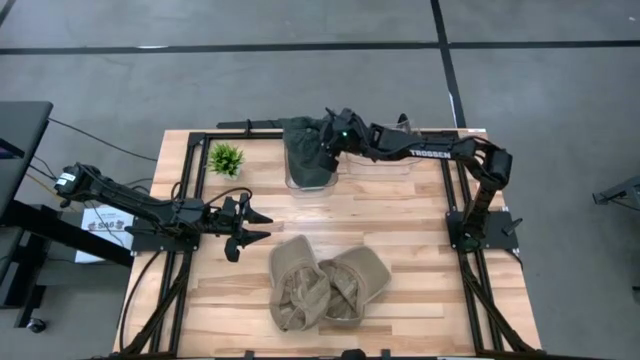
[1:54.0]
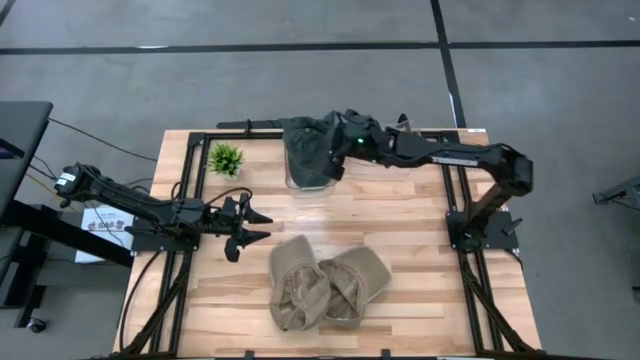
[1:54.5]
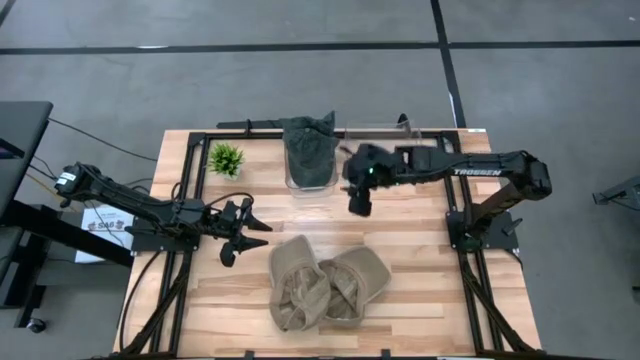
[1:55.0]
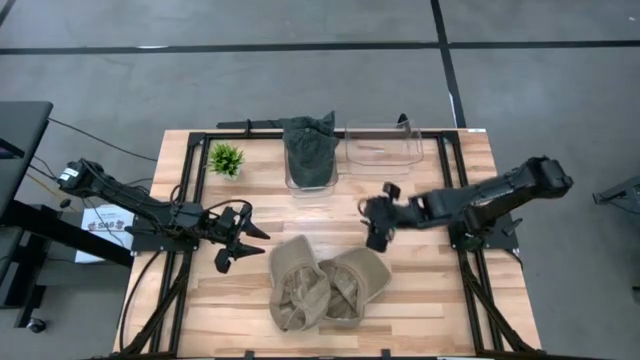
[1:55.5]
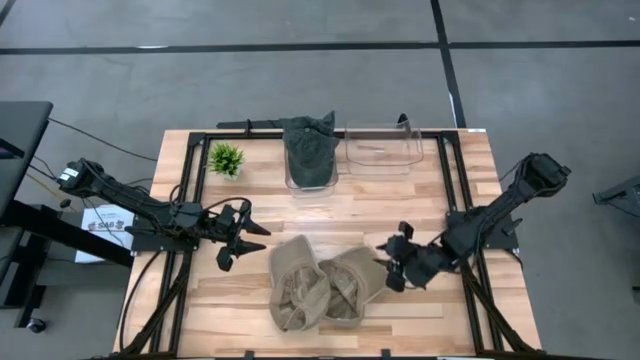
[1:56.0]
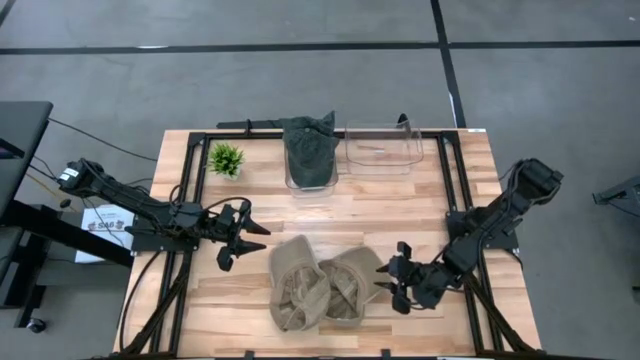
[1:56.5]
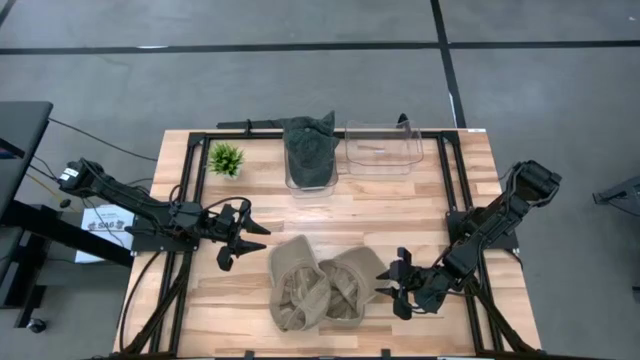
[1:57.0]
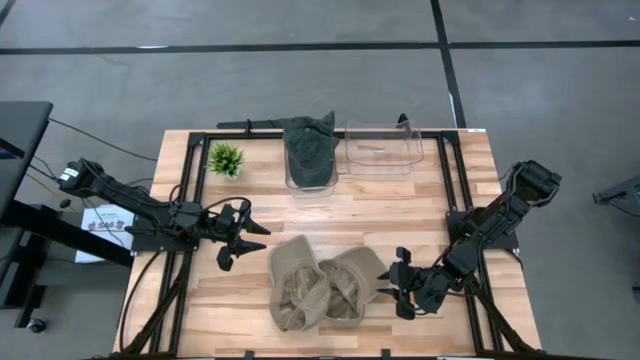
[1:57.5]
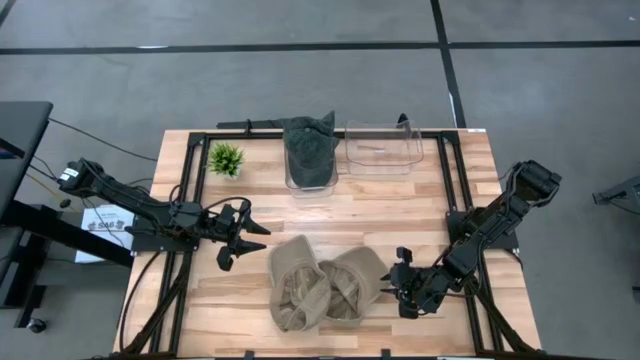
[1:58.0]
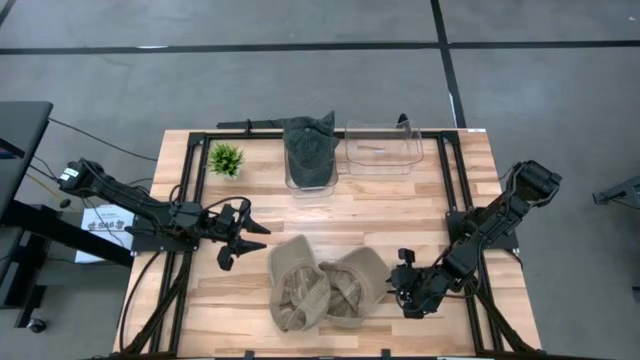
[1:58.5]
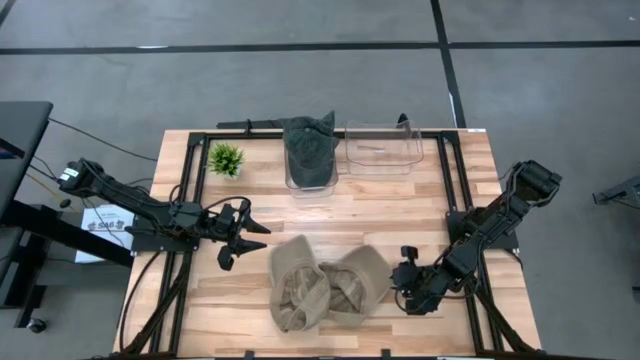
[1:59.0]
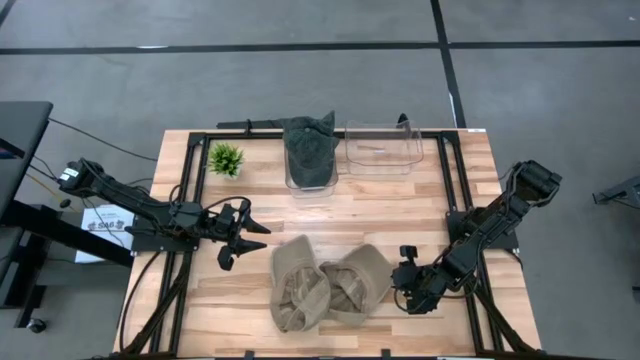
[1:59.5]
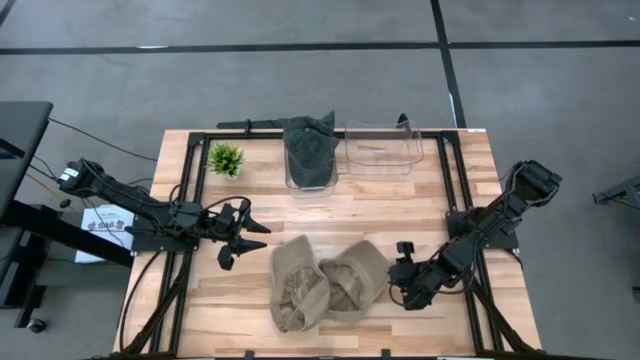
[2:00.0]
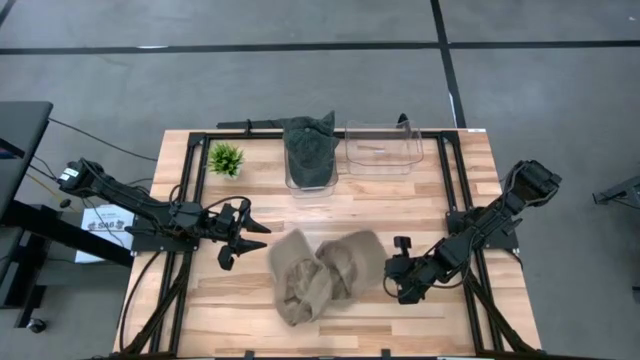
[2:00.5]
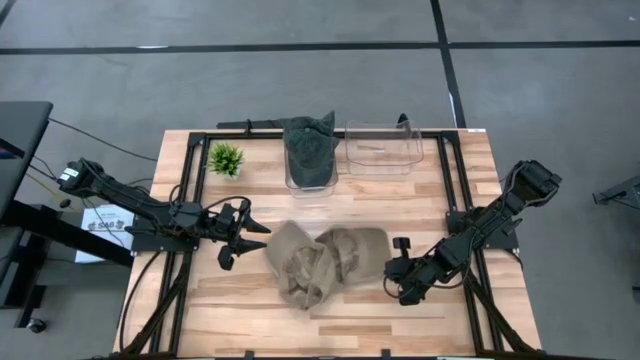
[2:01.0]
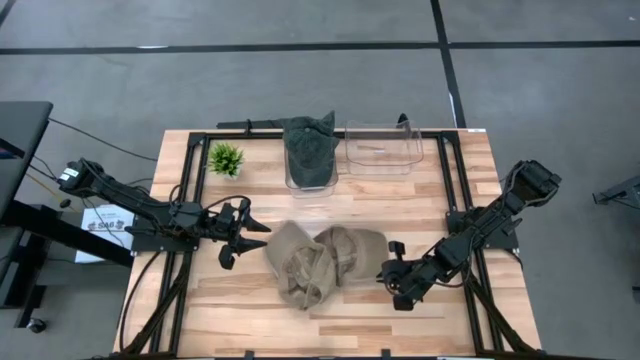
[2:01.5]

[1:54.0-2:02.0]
Task: Pick & Place hat
Put the brown cap into the right transparent bin

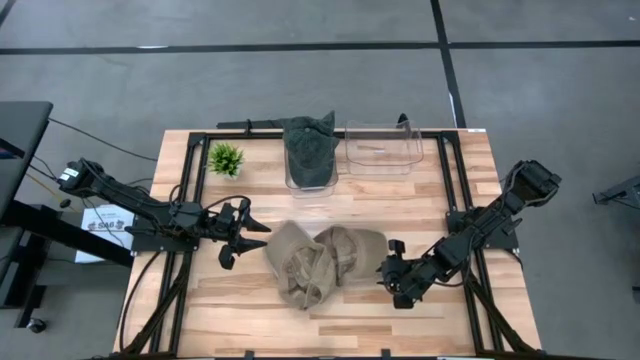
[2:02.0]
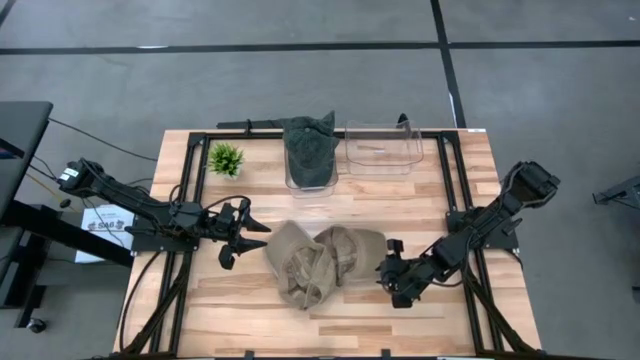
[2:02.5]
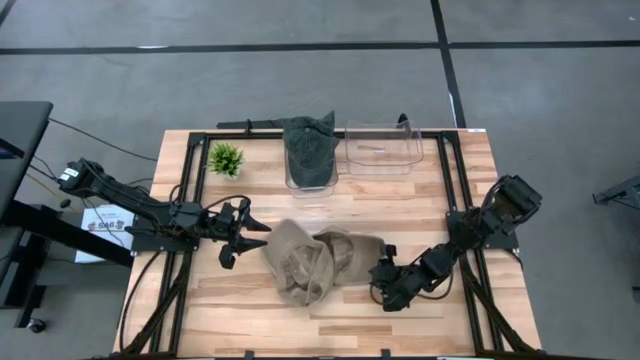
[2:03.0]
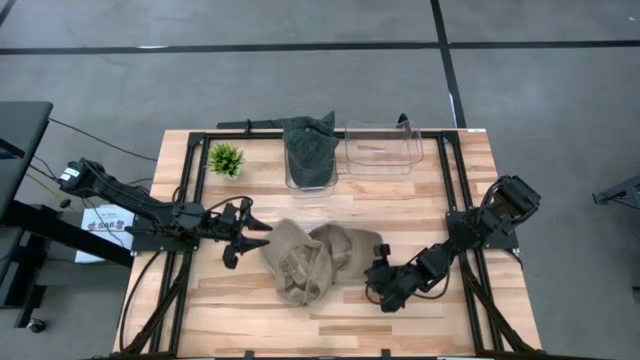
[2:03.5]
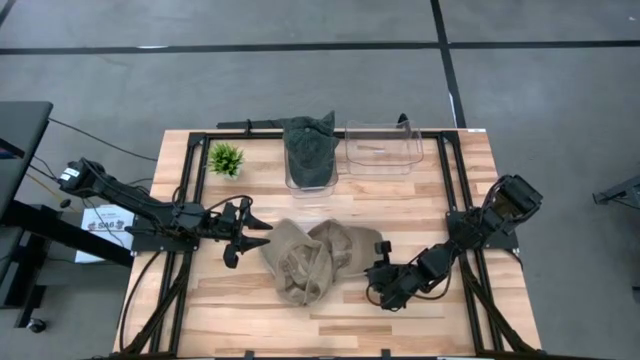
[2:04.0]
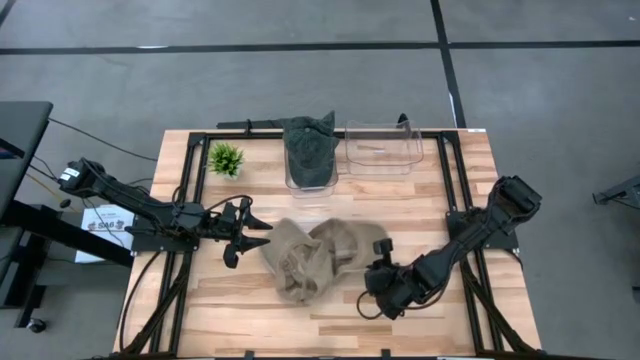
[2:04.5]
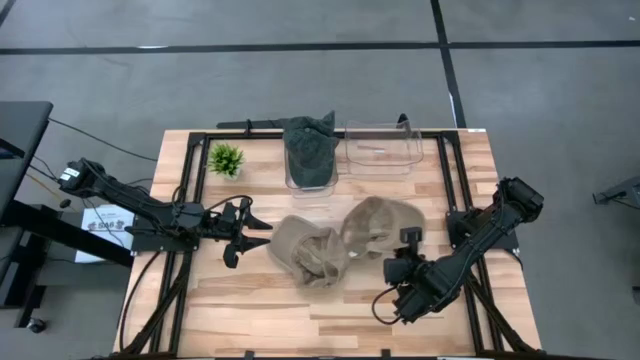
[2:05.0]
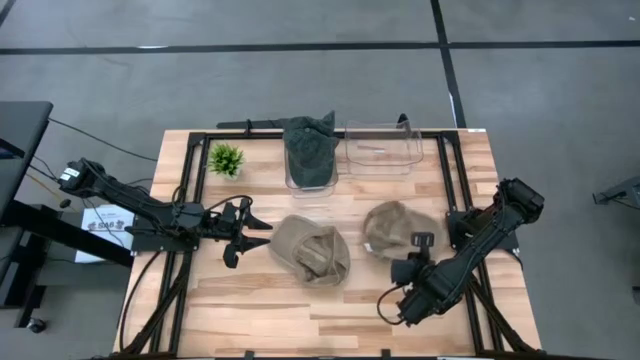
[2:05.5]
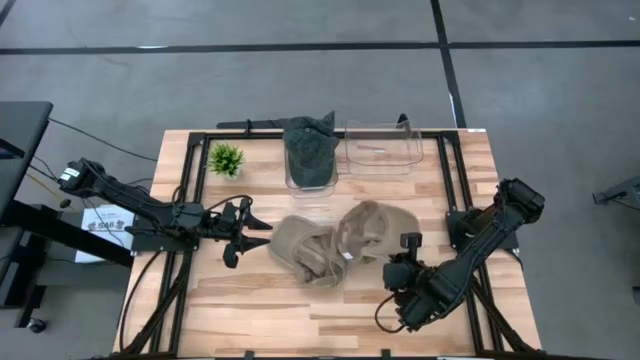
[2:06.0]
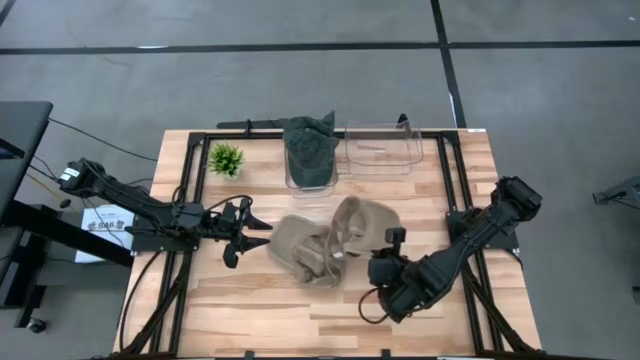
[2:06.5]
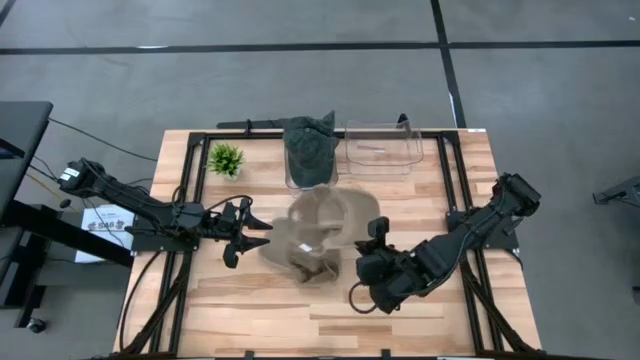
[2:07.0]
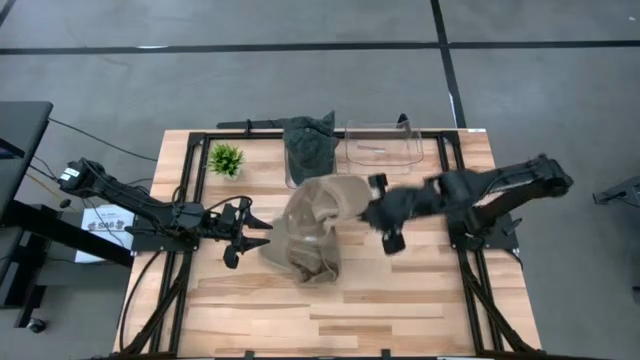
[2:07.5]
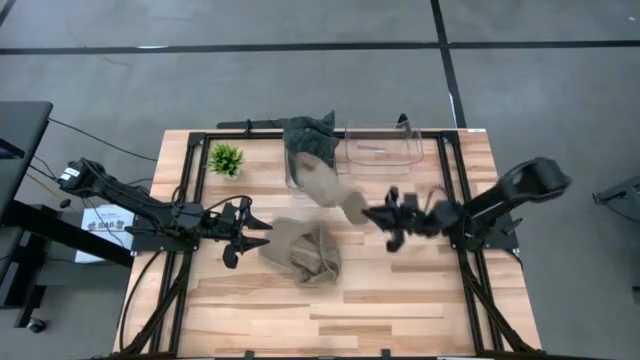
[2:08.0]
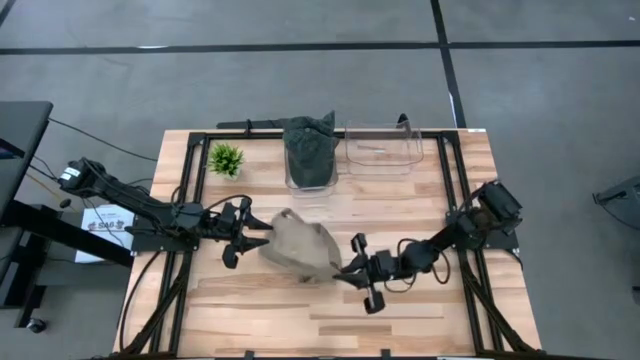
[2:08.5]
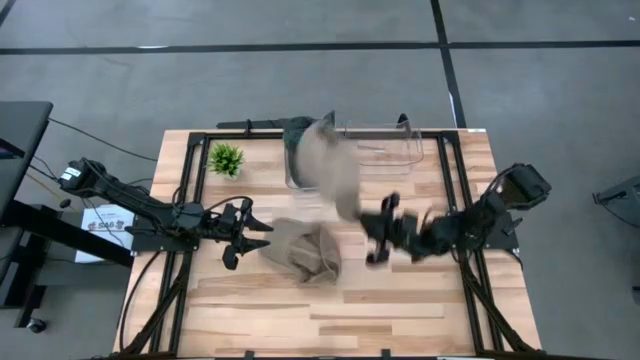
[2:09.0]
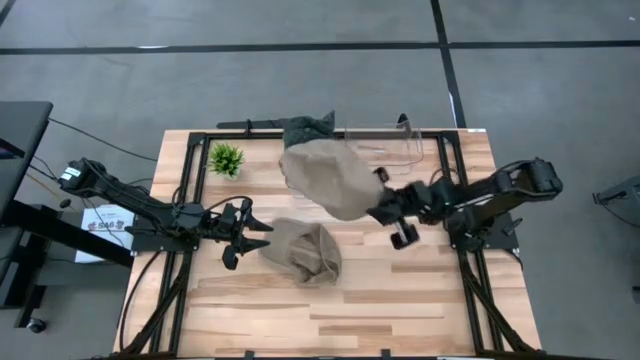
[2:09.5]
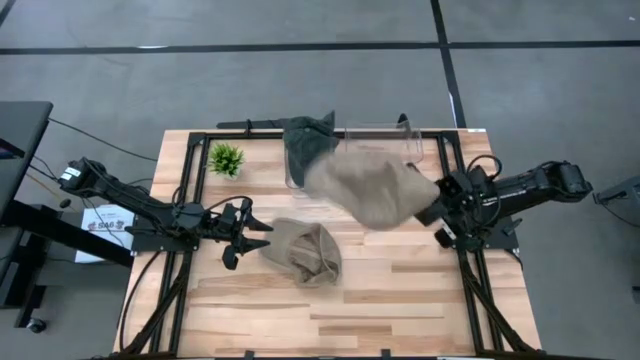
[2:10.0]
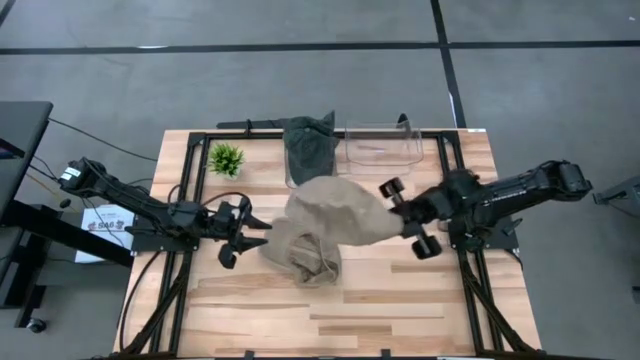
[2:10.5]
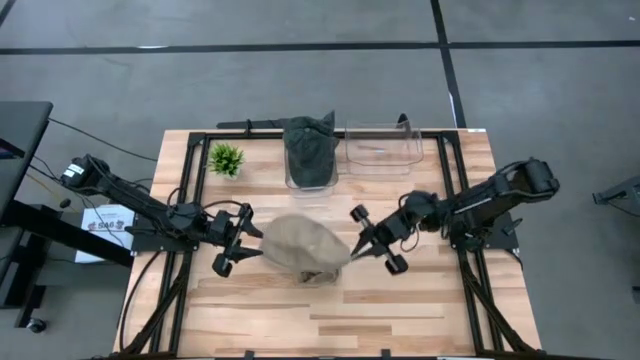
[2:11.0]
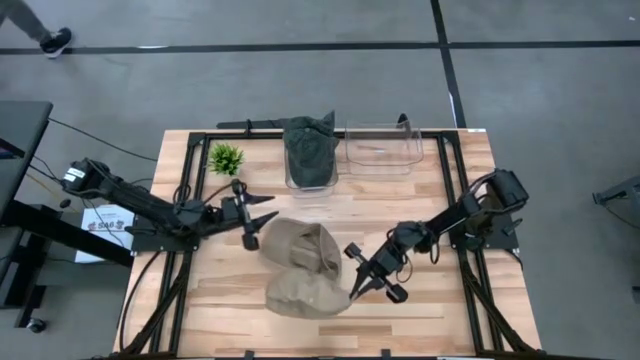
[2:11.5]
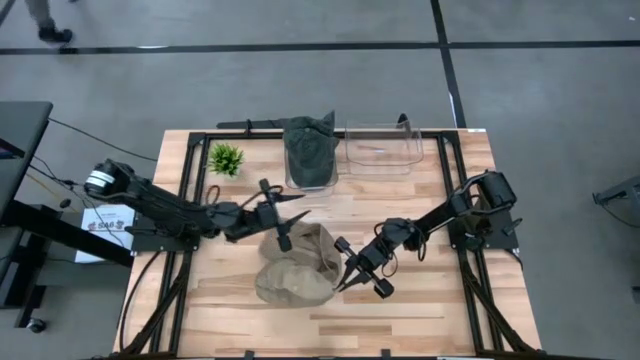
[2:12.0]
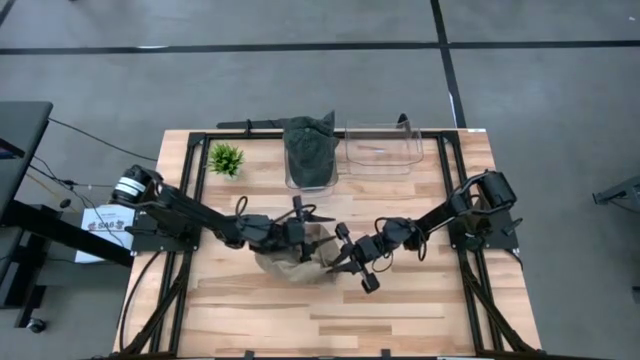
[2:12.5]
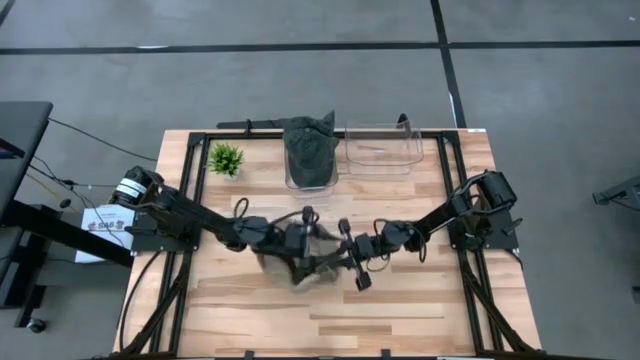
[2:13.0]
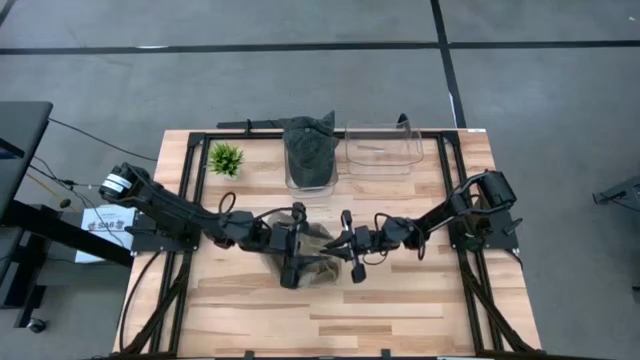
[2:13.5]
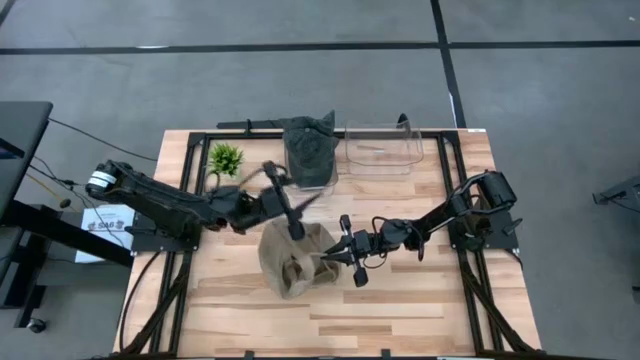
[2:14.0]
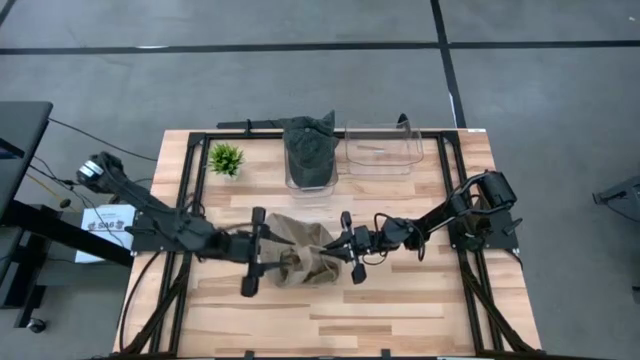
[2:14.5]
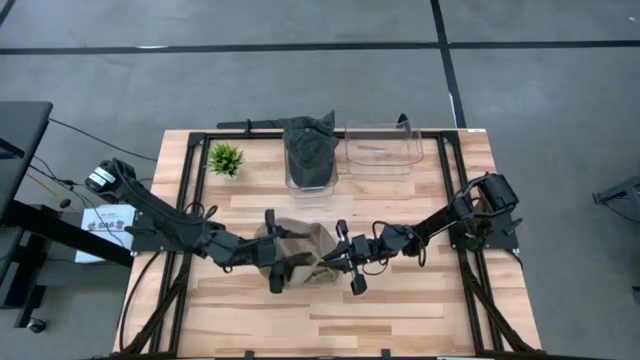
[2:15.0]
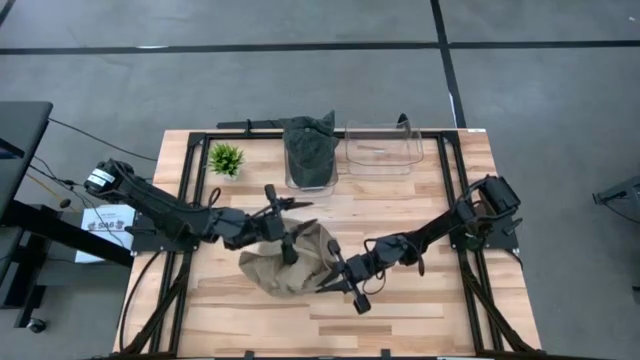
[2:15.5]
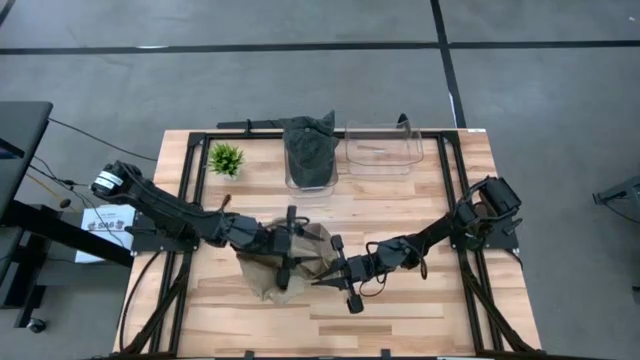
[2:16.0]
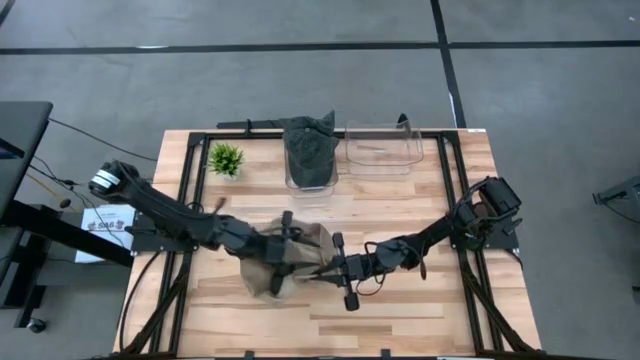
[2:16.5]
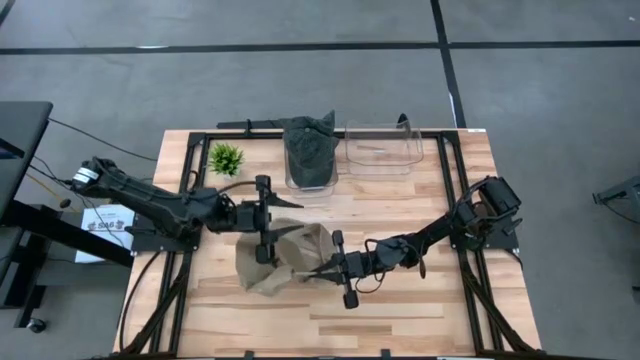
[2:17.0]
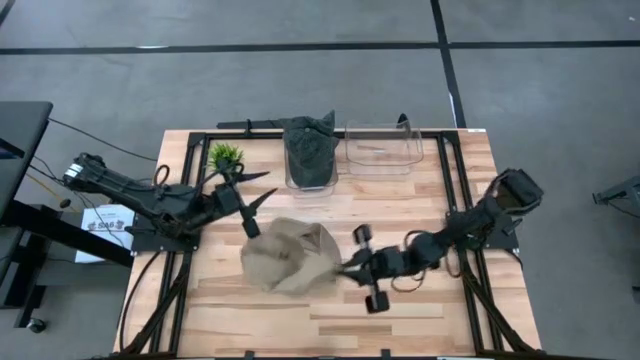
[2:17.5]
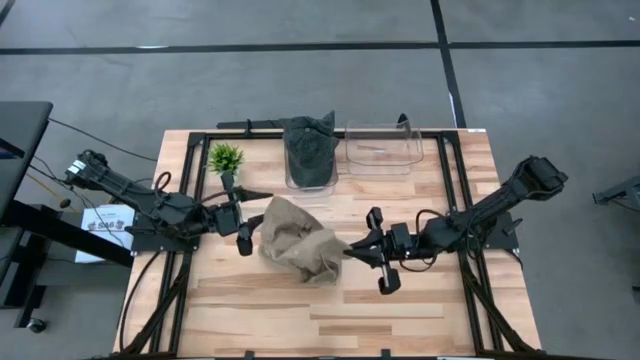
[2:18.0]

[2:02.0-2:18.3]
Put the brown cap into the right transparent bin
